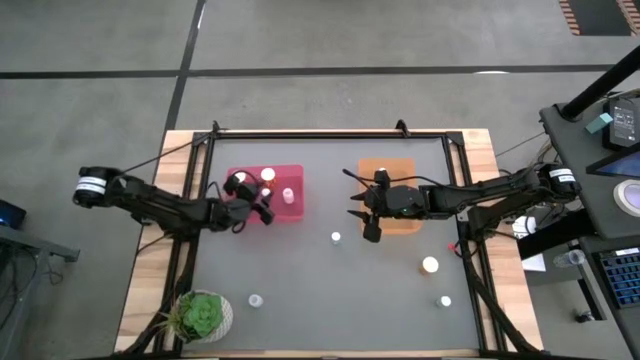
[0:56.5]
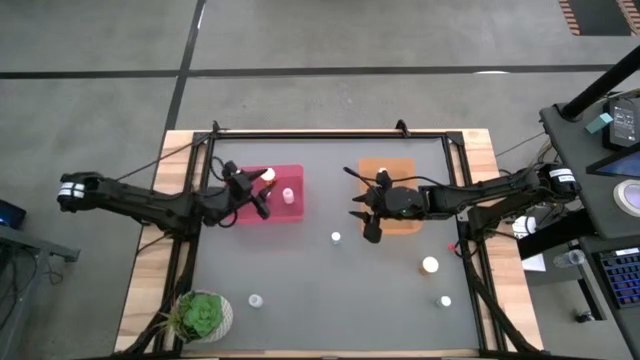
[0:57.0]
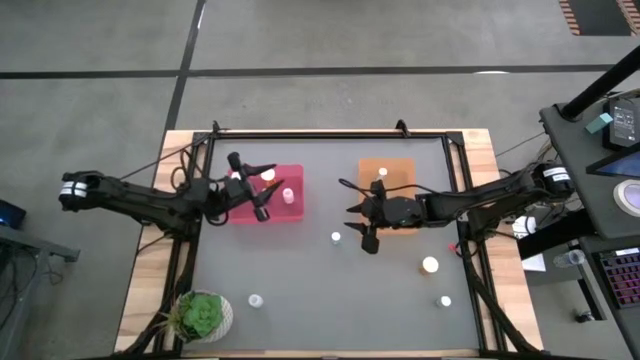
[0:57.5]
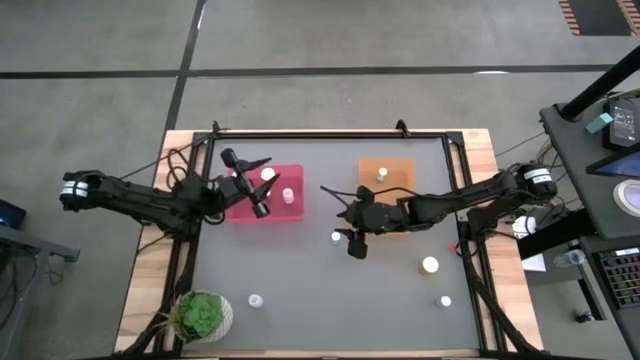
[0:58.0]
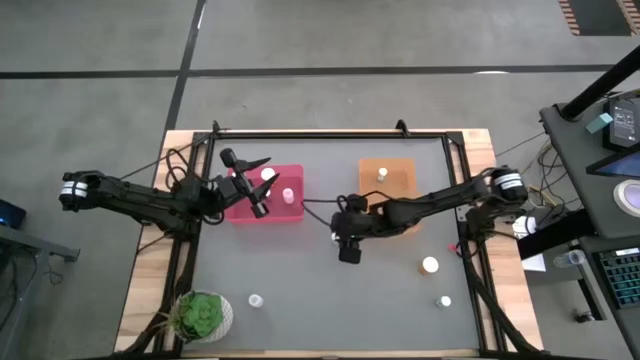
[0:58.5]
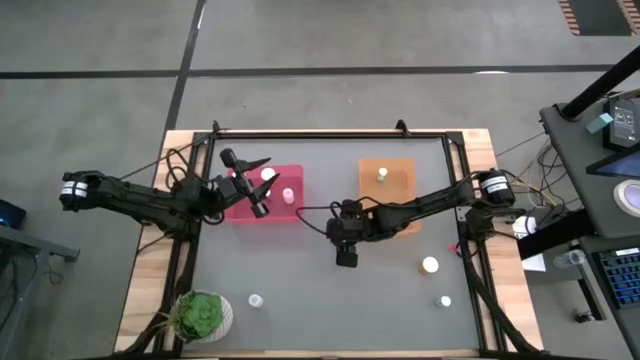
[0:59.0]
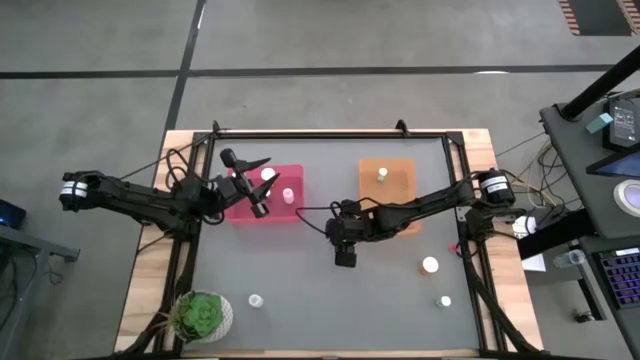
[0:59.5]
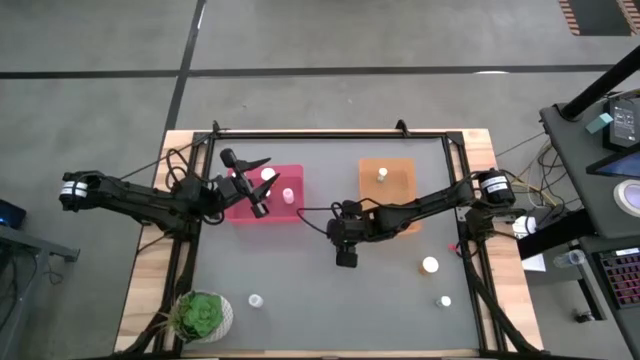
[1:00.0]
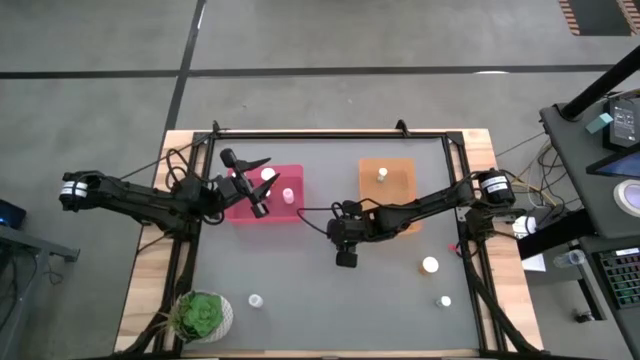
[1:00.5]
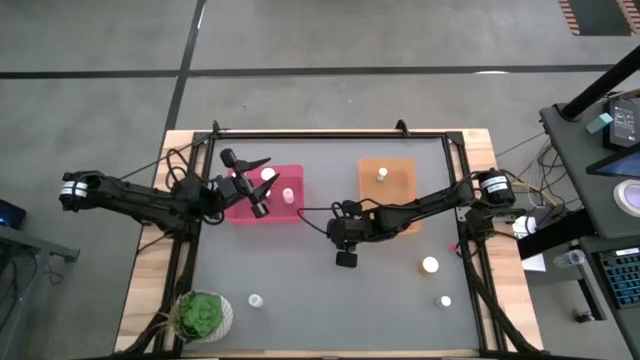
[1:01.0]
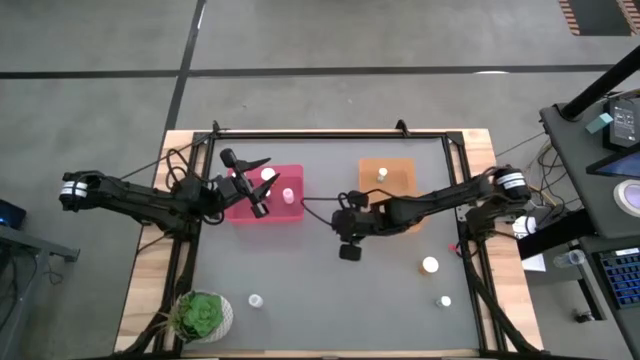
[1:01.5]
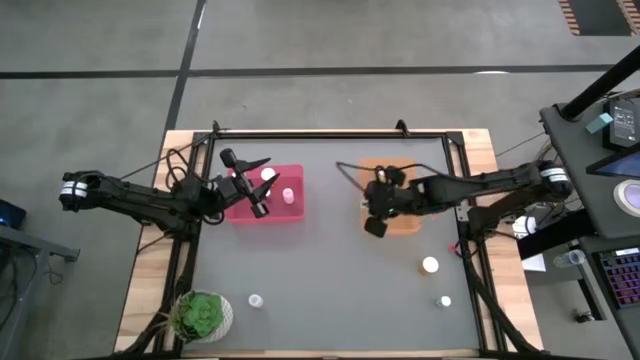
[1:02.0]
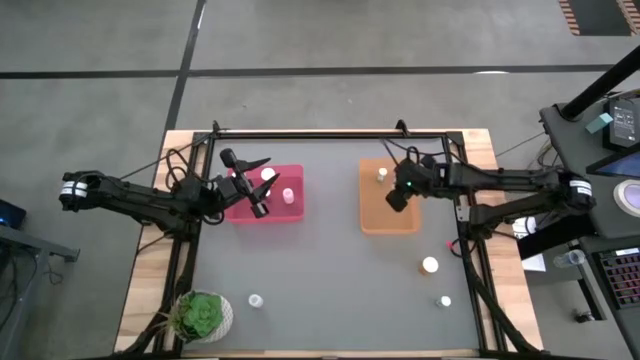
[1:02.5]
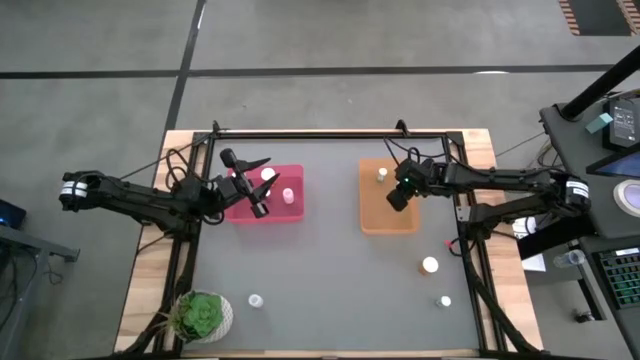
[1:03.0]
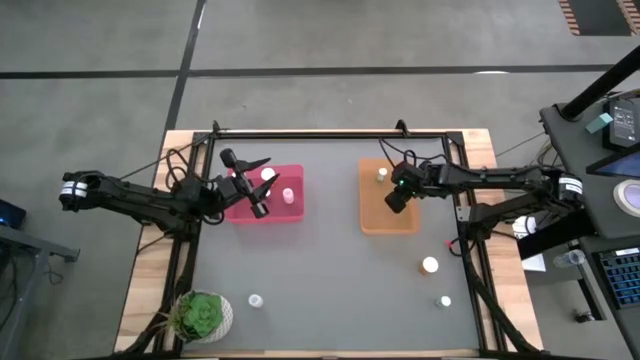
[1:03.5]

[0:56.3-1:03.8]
Task: Pick and place medicine bottles into bin by pill shape (circle, oval)
Put the top blue pill into the orange bin

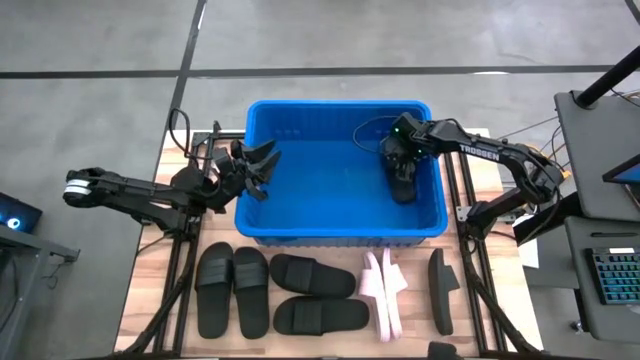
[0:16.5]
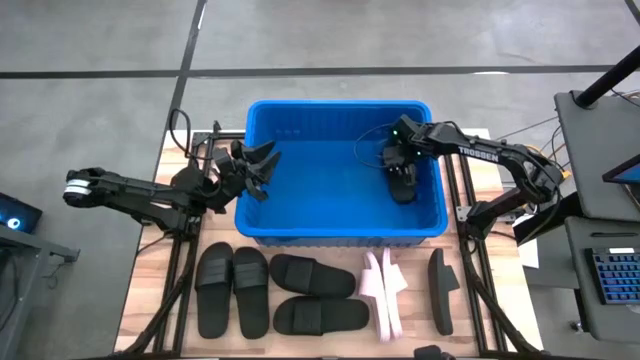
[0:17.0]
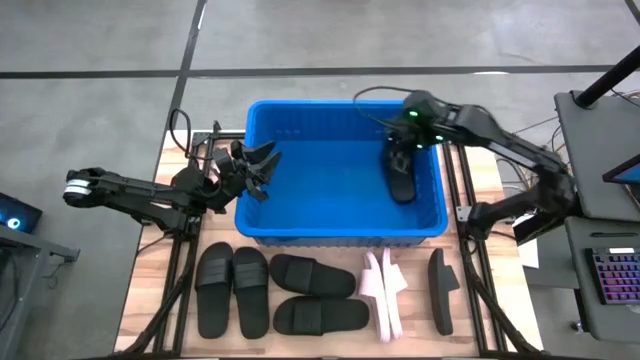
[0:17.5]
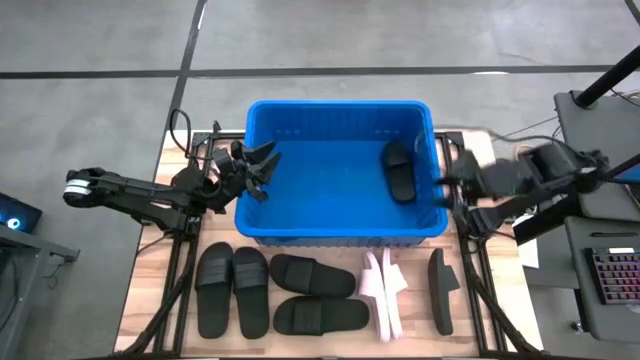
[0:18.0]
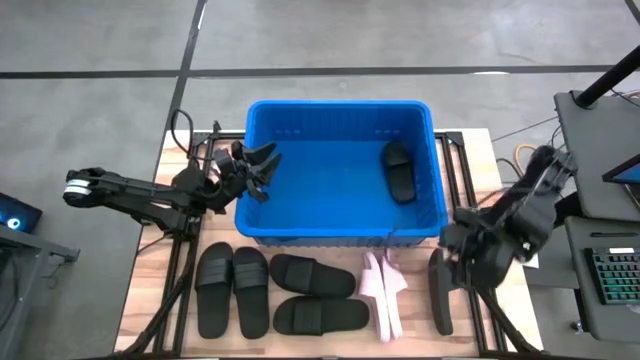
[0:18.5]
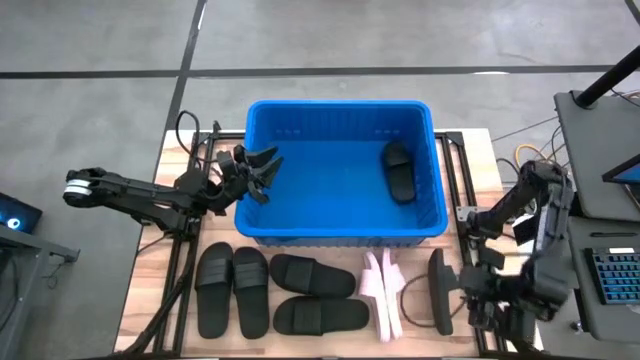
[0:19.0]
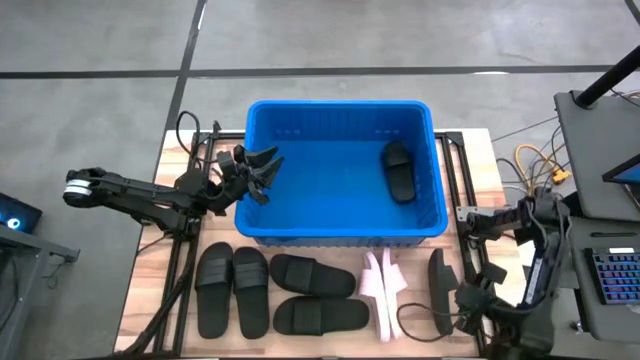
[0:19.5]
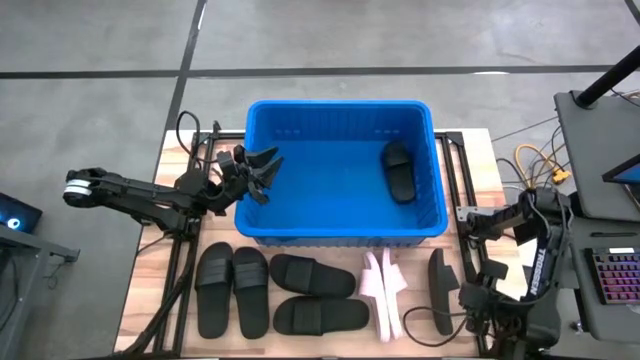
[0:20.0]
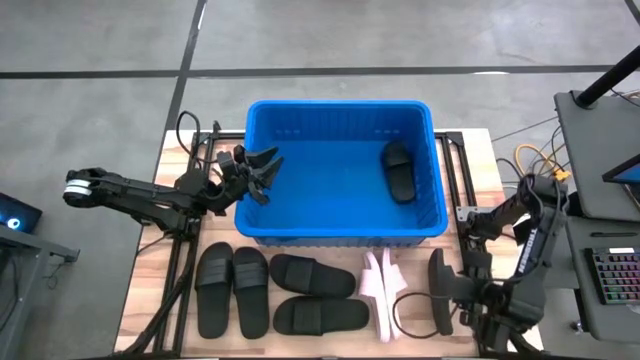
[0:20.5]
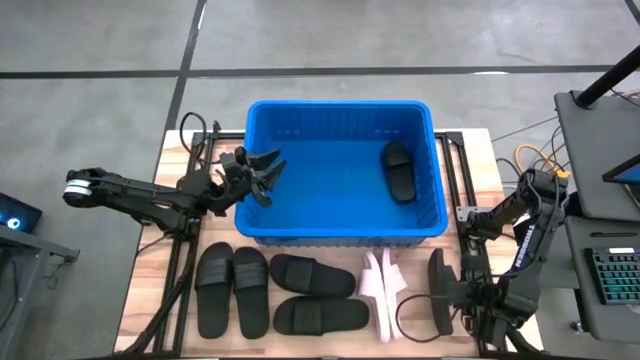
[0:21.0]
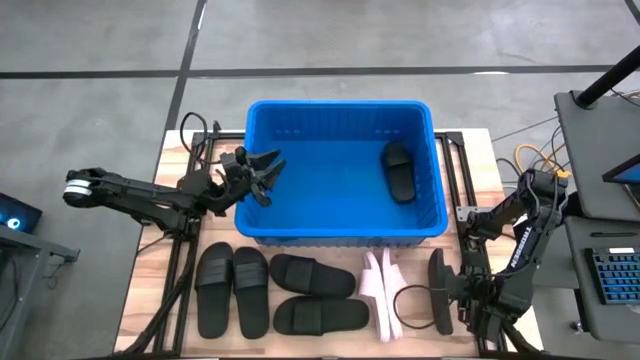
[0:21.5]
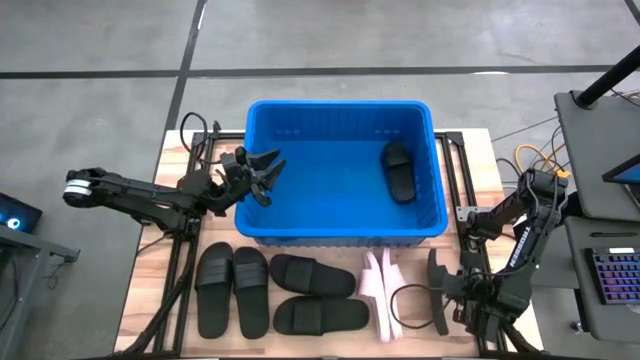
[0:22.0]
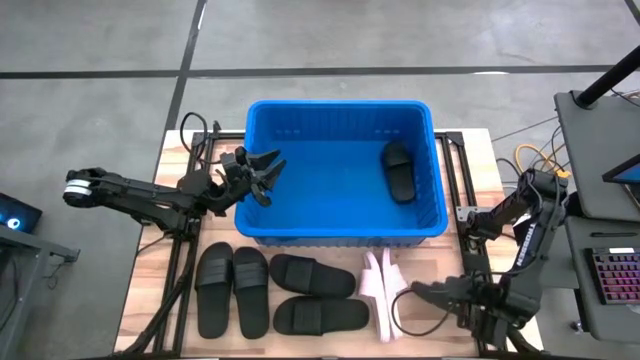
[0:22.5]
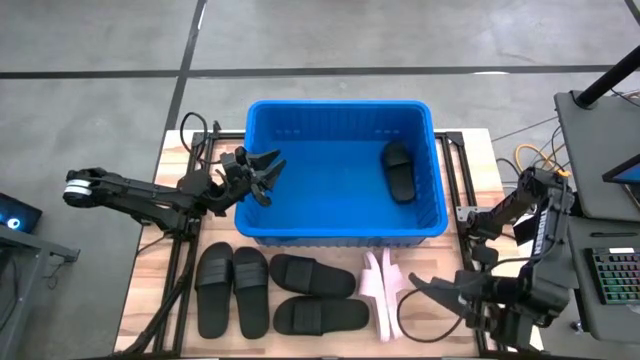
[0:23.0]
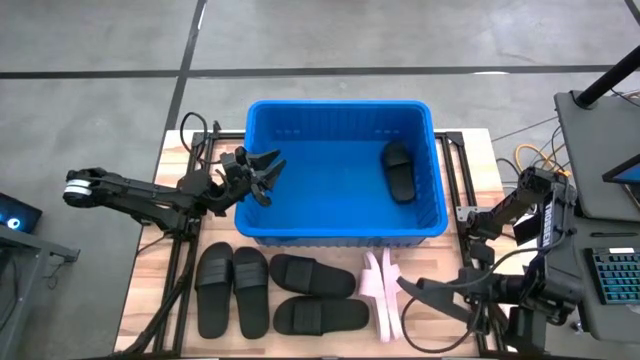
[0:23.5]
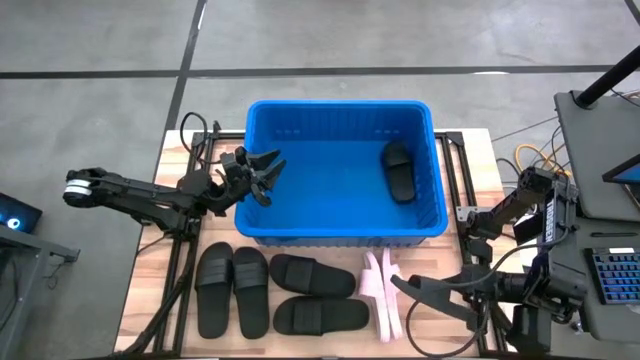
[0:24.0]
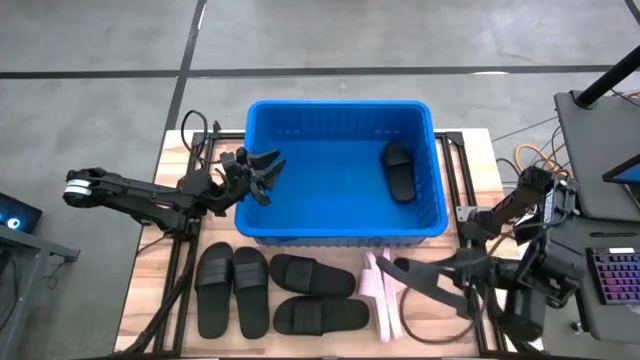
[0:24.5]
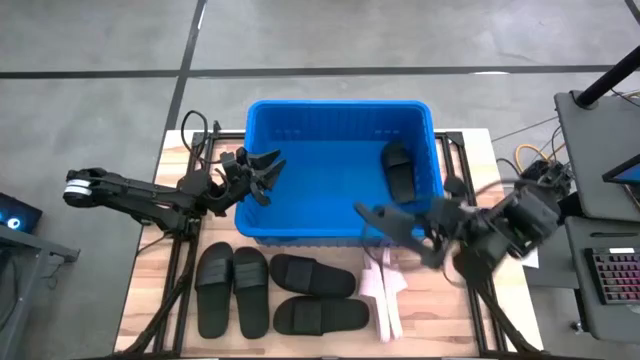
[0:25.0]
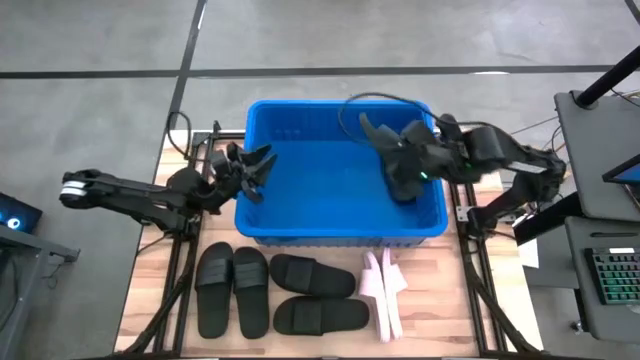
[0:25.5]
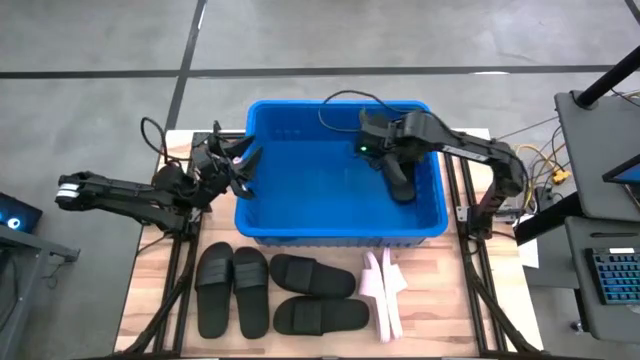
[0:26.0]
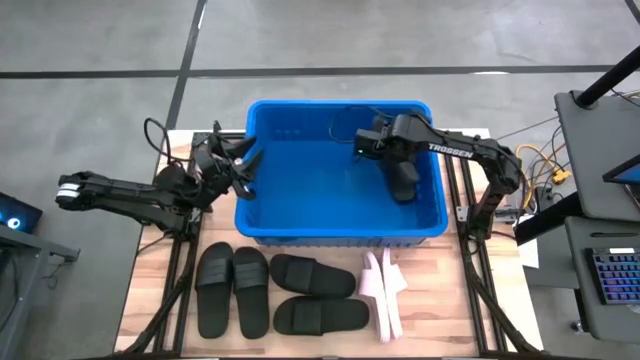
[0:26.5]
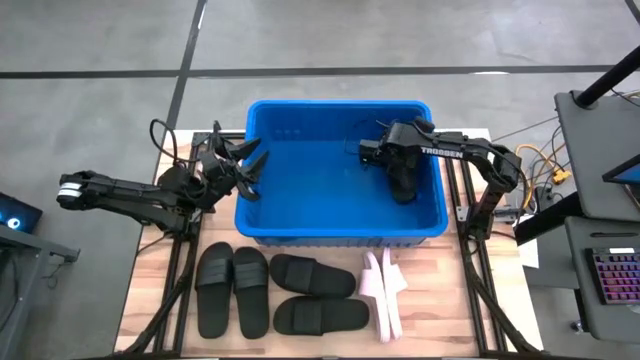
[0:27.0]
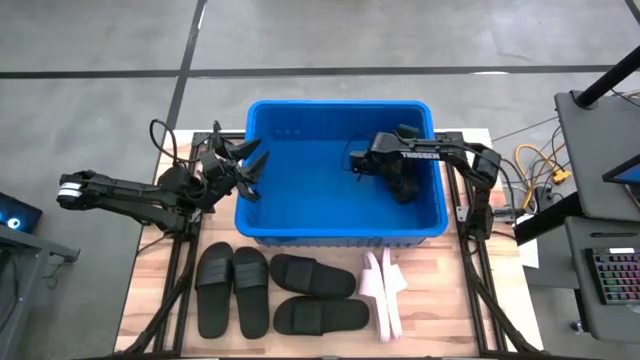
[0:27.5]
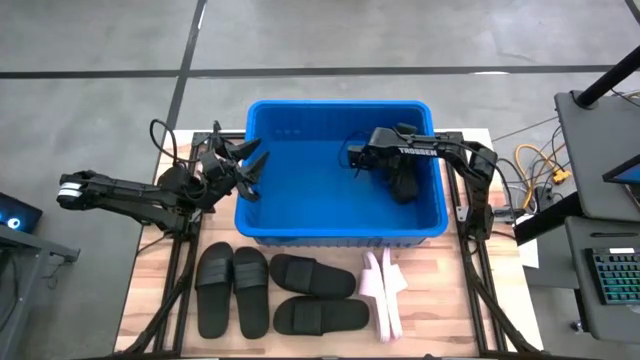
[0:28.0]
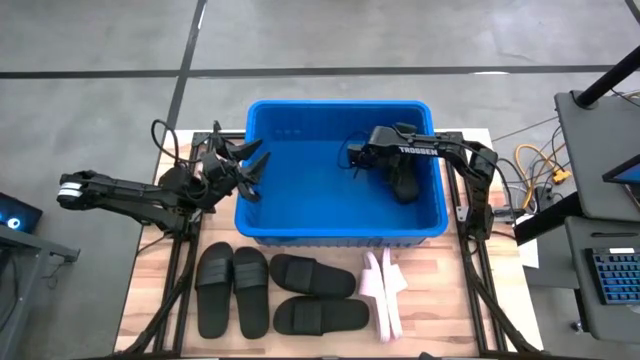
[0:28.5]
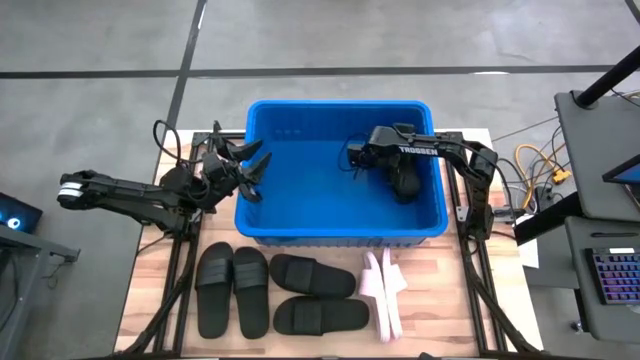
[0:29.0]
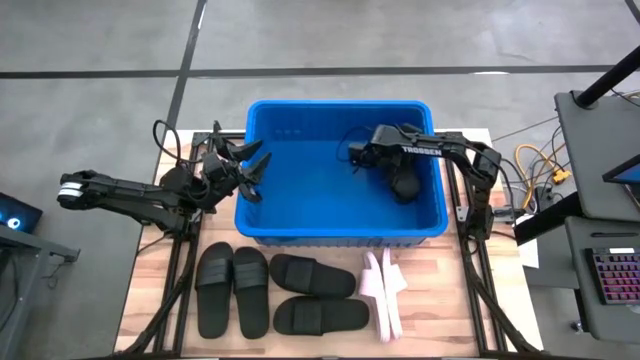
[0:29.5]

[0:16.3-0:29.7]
Task: Pick and place slides into bin
Put the black slide into the blue container
